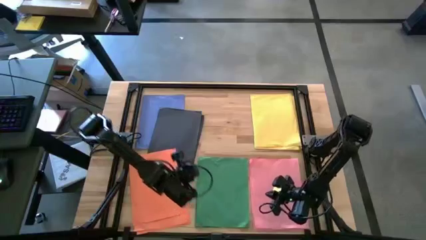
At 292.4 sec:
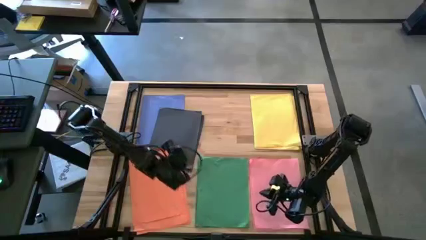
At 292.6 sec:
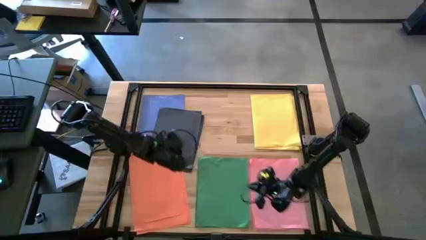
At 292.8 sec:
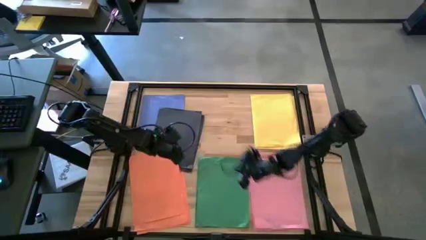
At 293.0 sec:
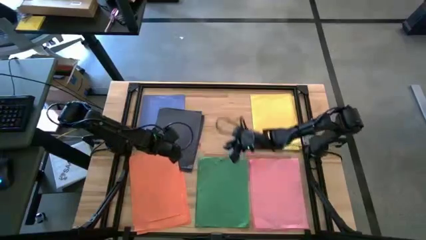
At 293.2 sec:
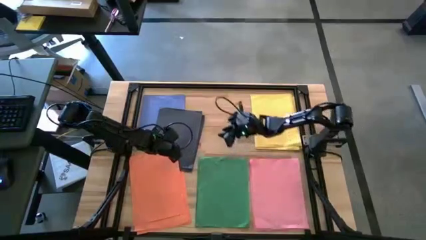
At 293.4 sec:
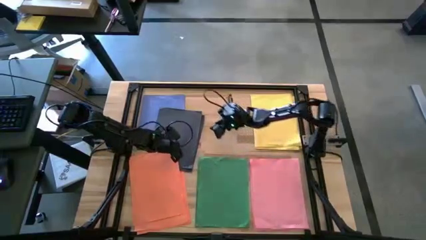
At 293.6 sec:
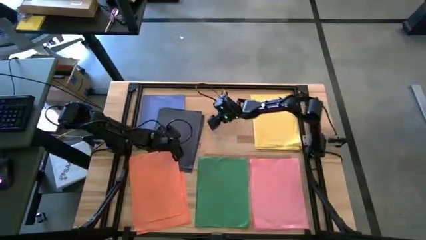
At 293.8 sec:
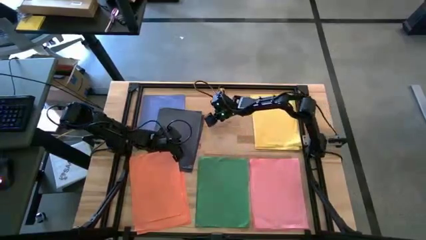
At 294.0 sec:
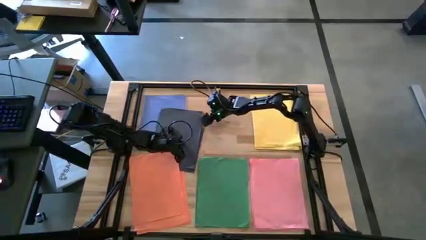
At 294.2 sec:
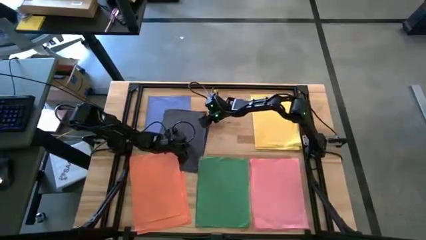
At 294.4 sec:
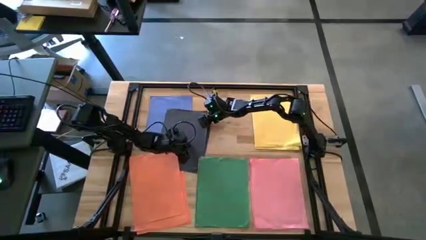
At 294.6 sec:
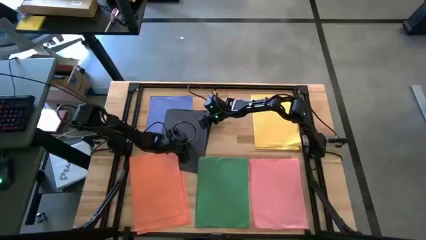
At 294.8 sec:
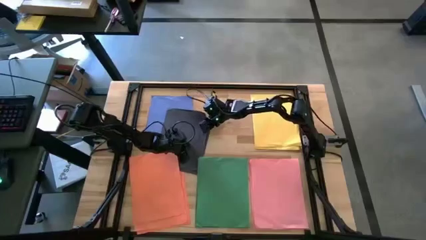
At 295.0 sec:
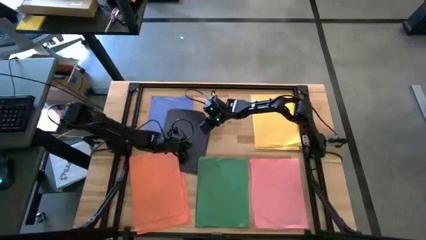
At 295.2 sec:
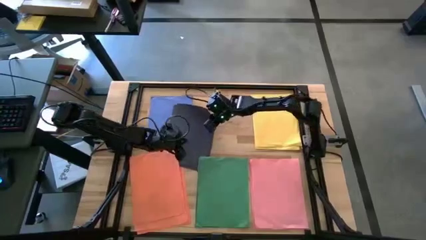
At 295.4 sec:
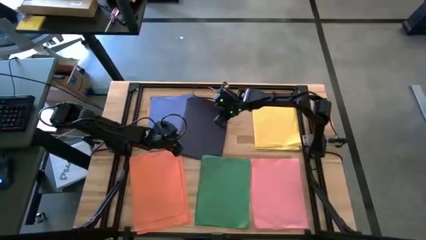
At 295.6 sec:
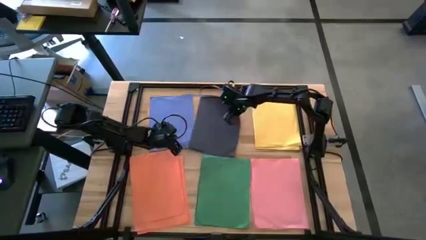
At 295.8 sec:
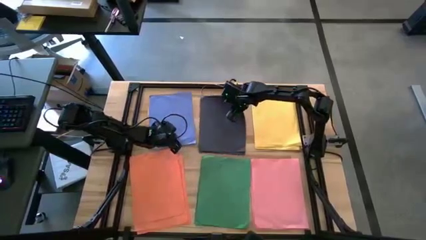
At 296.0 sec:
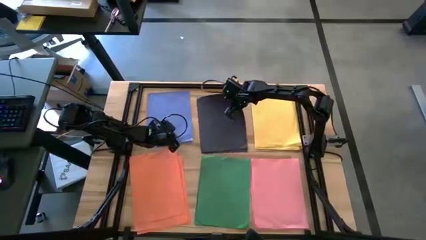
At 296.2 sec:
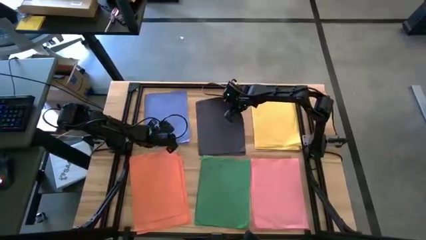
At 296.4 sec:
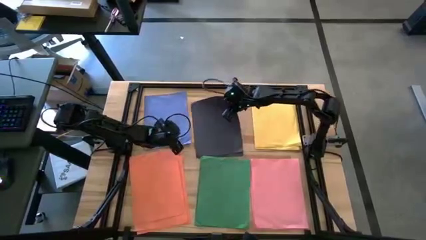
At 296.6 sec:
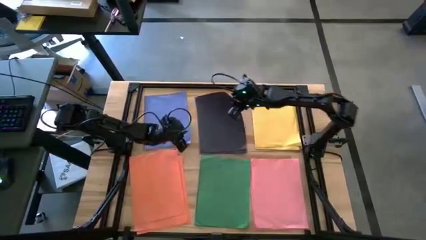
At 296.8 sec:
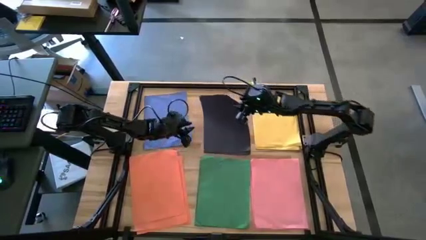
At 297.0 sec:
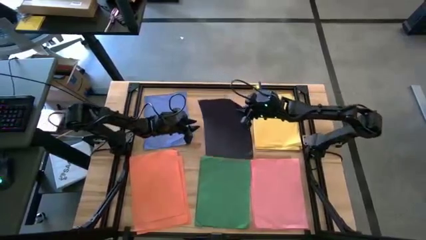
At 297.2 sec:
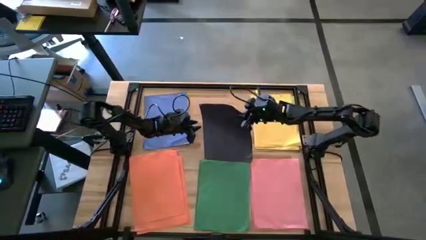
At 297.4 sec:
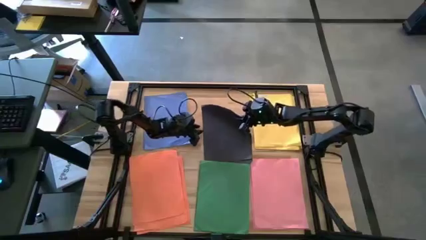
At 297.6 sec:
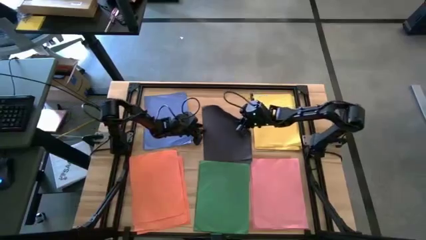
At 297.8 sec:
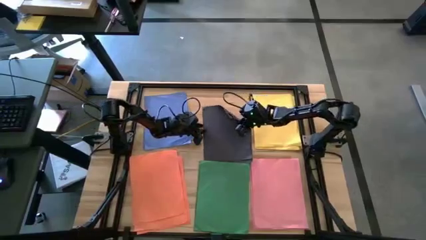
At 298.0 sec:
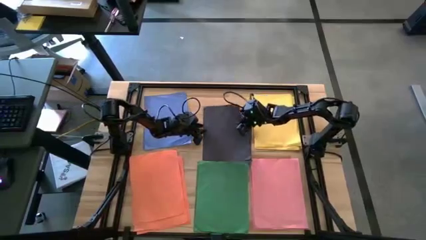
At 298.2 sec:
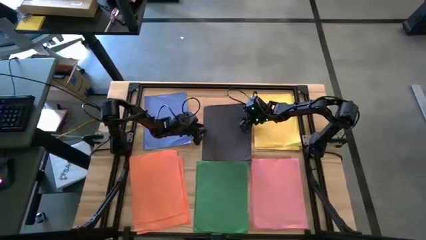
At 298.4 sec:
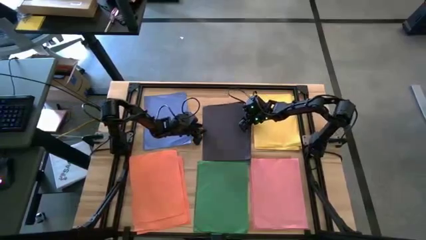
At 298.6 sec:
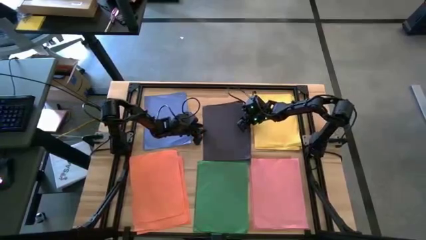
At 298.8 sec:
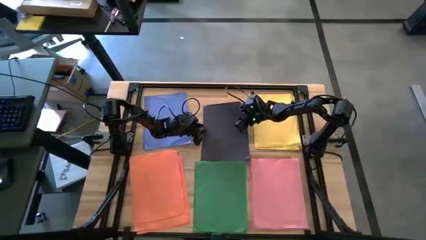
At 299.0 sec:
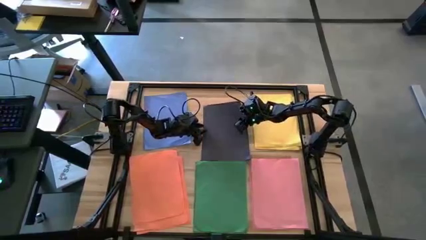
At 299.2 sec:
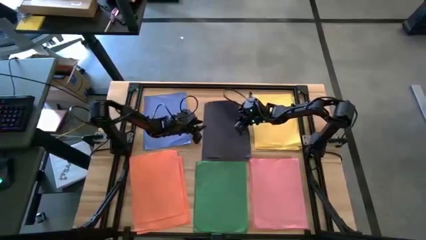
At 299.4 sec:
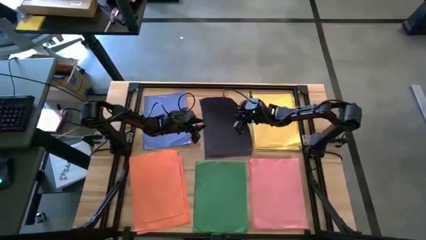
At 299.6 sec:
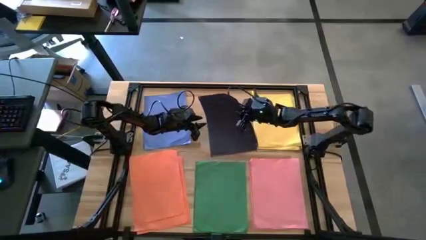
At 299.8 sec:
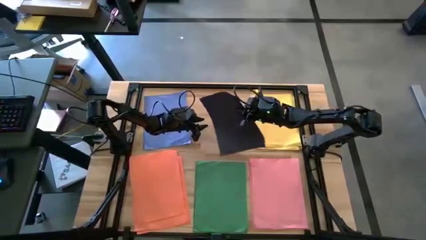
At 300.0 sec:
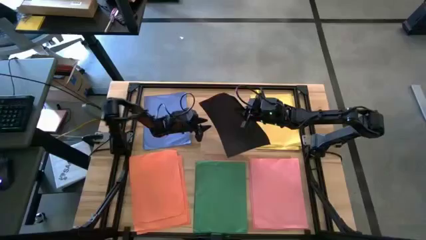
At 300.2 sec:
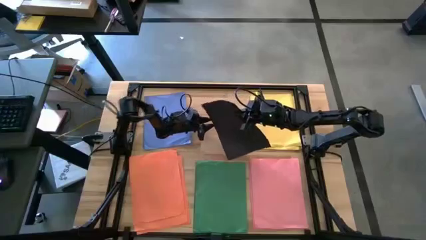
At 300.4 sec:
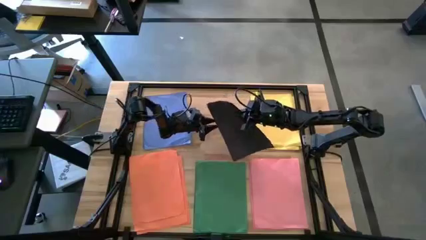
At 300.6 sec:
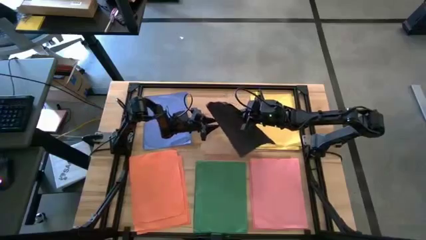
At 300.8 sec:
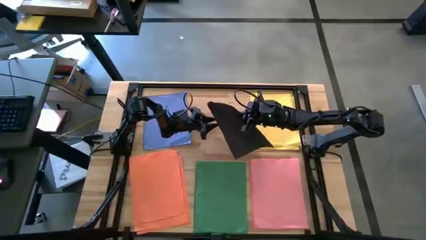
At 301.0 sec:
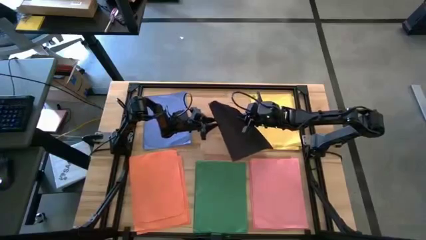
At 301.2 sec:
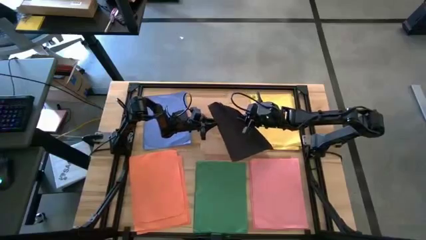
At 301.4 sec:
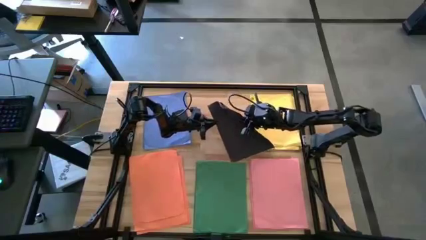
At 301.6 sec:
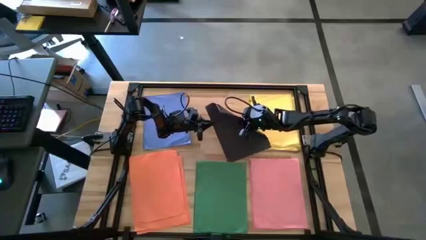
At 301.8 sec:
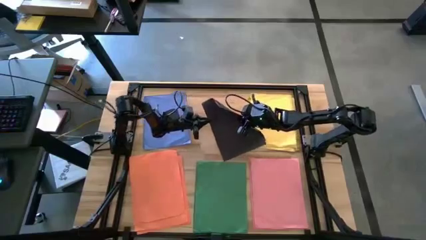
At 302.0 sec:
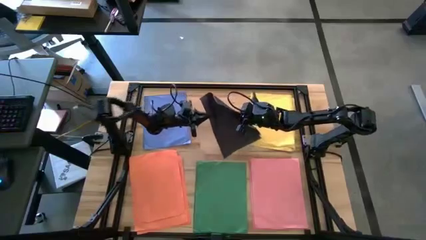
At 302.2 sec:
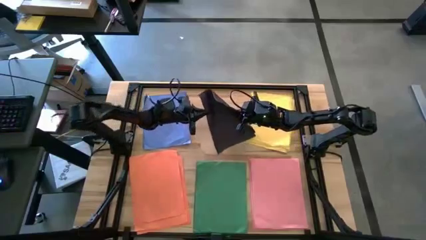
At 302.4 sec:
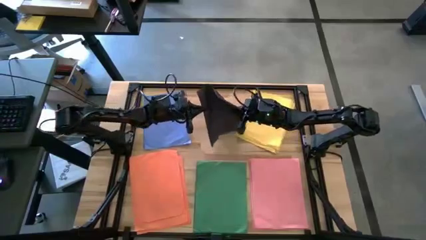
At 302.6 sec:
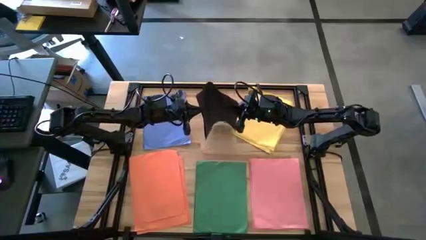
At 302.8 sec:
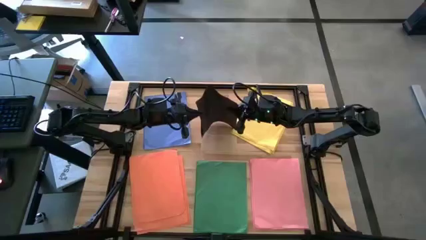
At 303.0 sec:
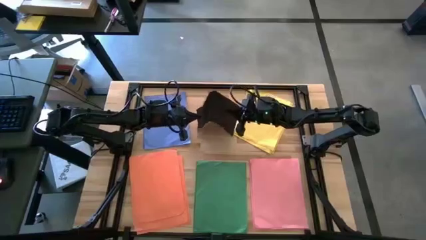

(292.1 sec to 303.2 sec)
Task: Organize paper
Move the stacked black papers to the upper middle of the table
